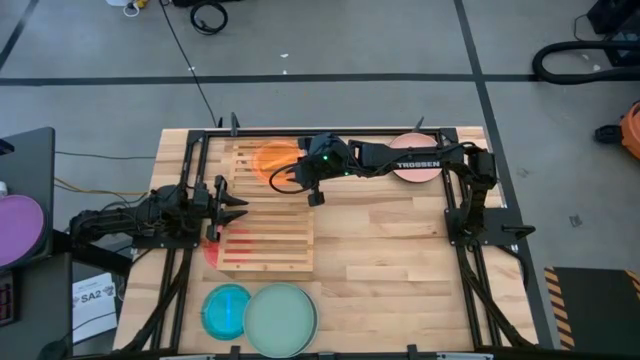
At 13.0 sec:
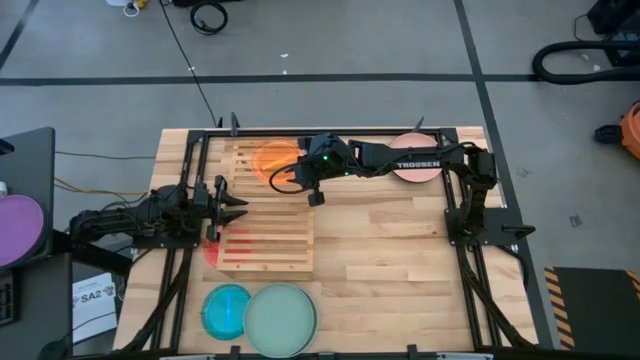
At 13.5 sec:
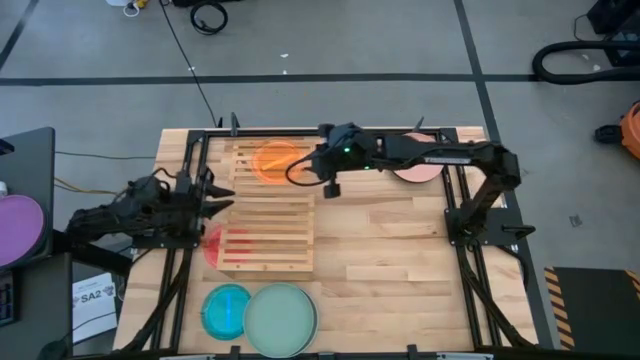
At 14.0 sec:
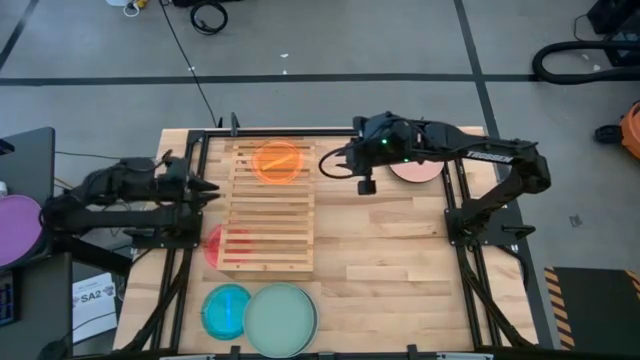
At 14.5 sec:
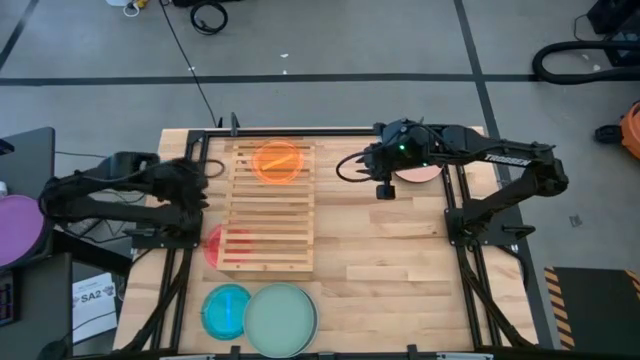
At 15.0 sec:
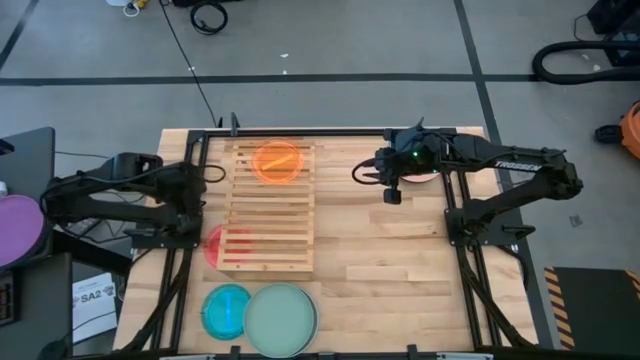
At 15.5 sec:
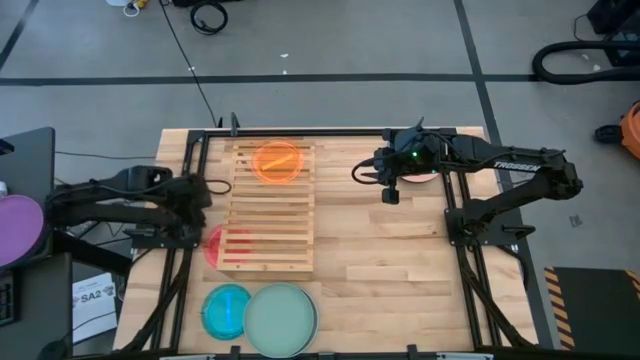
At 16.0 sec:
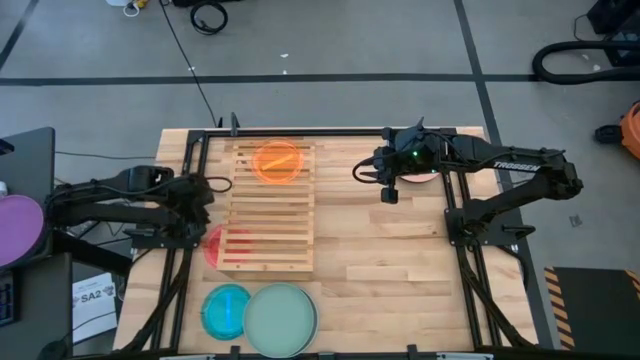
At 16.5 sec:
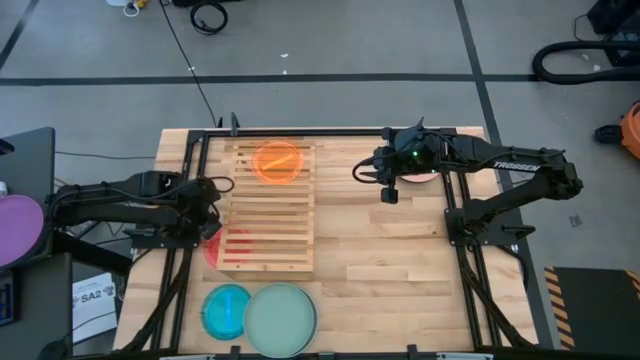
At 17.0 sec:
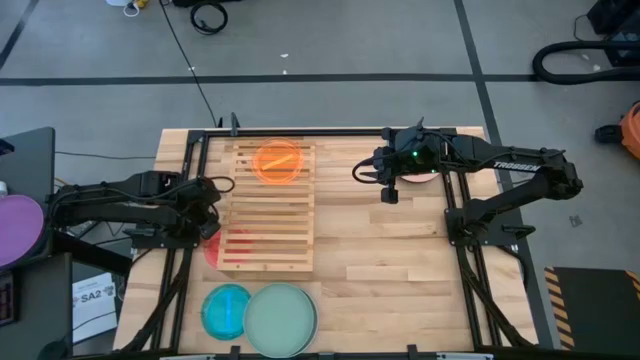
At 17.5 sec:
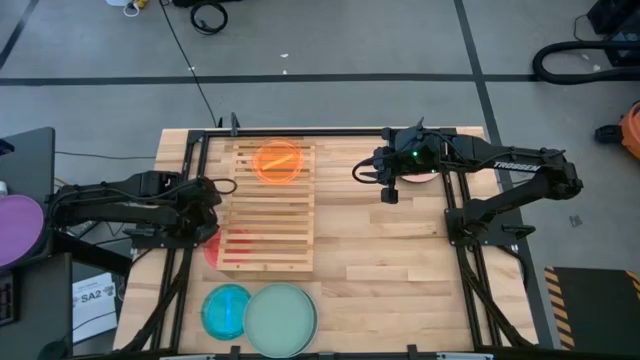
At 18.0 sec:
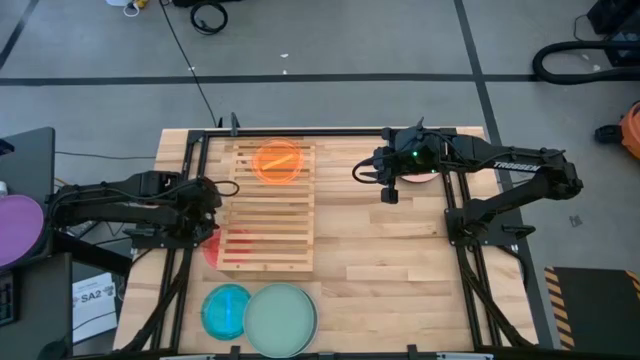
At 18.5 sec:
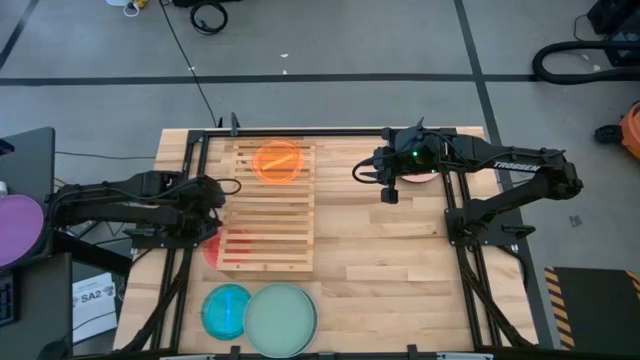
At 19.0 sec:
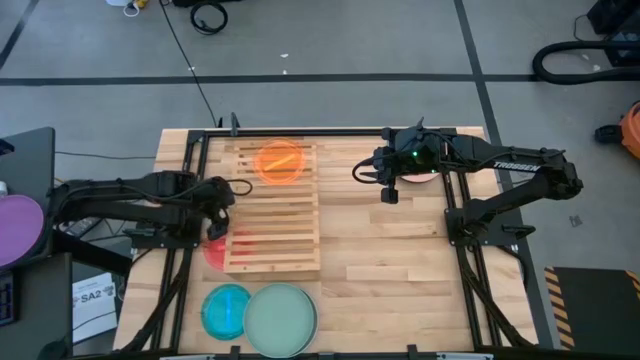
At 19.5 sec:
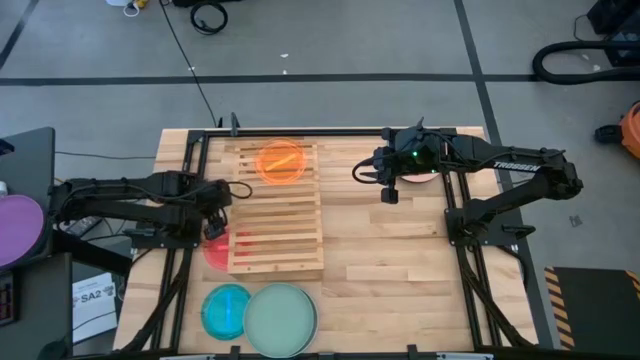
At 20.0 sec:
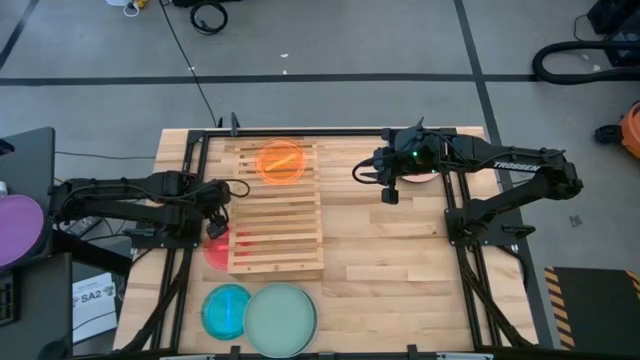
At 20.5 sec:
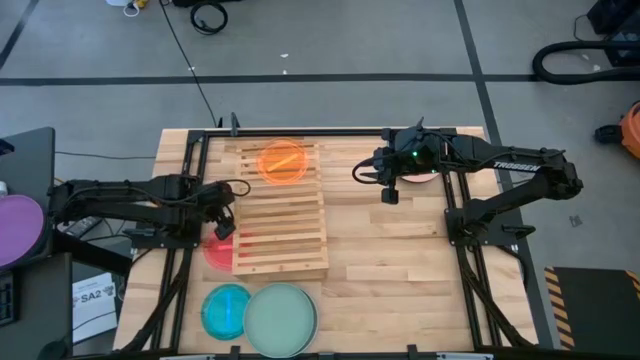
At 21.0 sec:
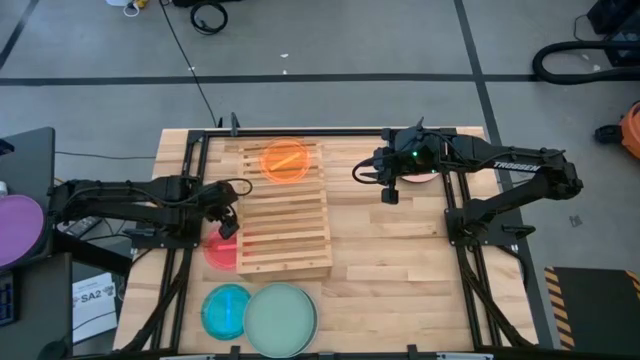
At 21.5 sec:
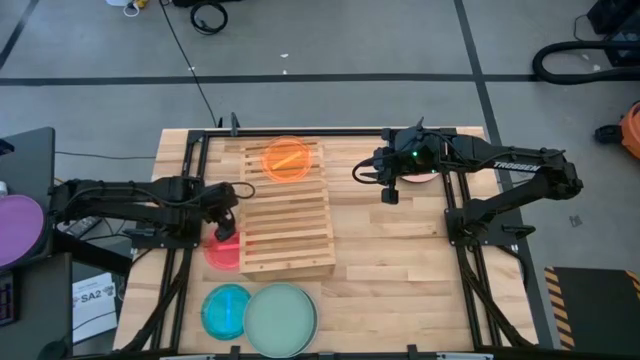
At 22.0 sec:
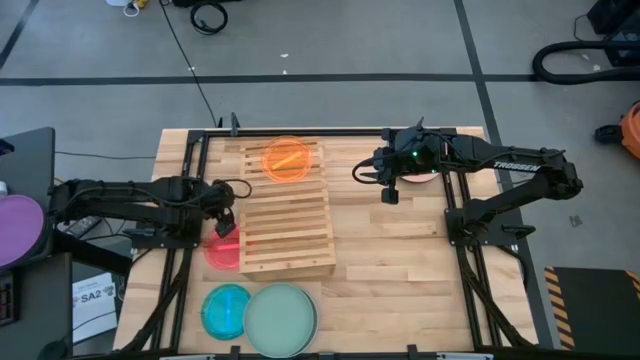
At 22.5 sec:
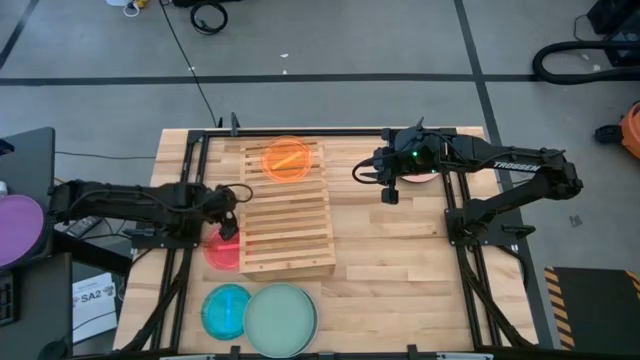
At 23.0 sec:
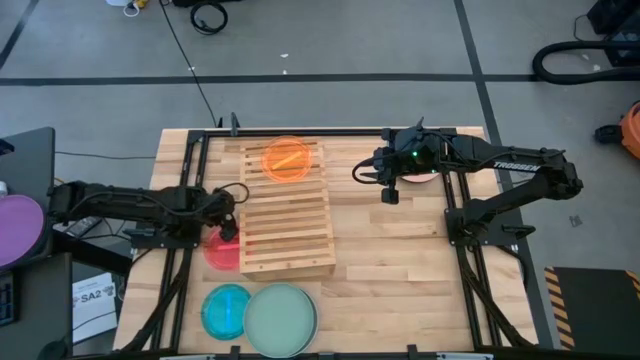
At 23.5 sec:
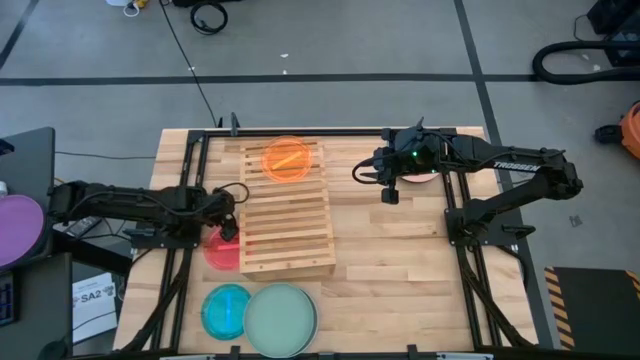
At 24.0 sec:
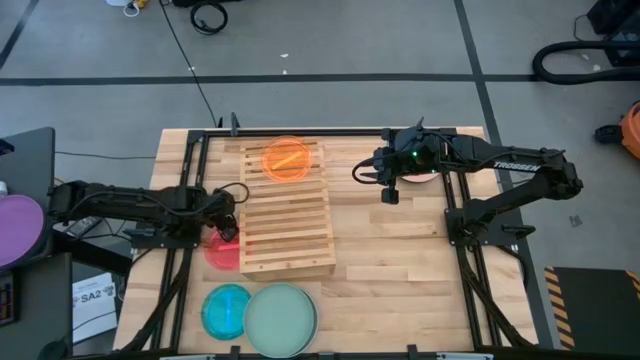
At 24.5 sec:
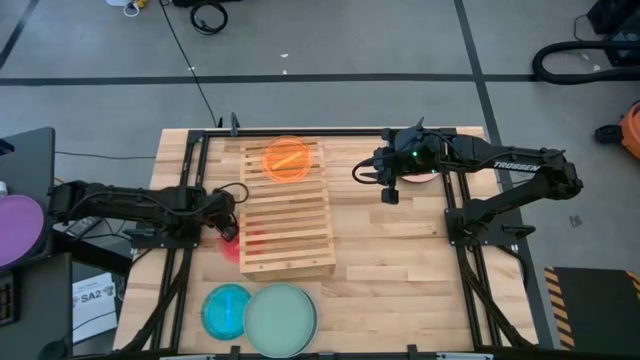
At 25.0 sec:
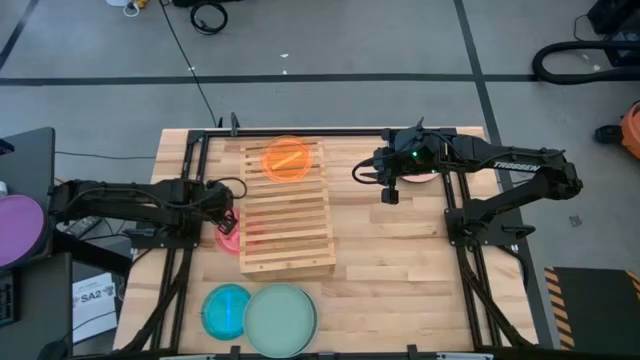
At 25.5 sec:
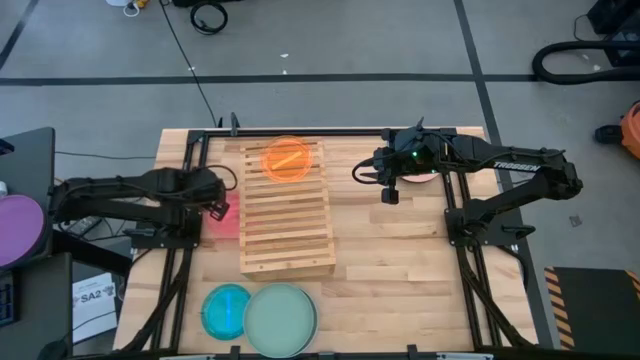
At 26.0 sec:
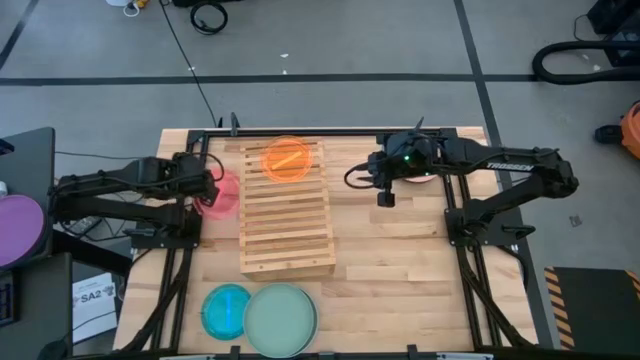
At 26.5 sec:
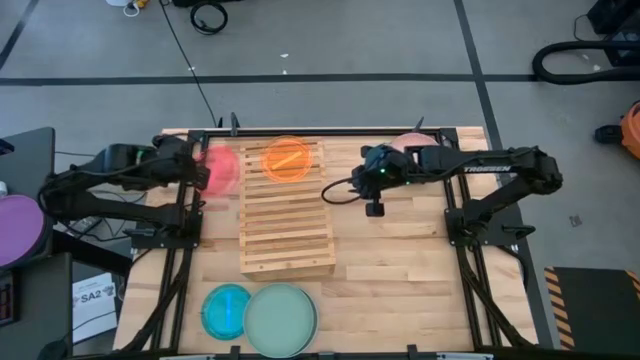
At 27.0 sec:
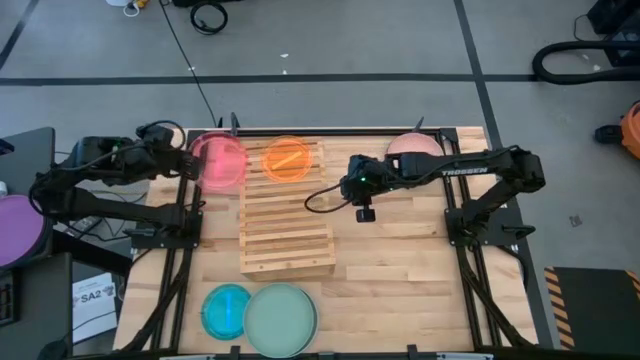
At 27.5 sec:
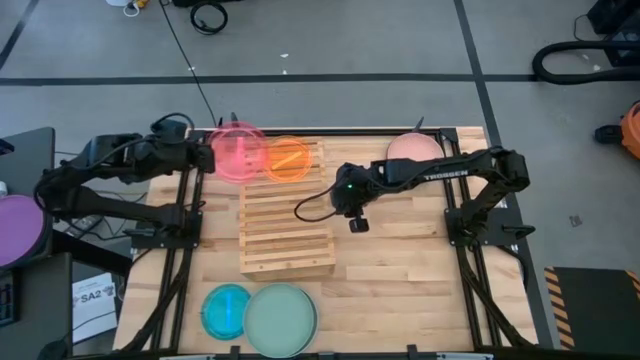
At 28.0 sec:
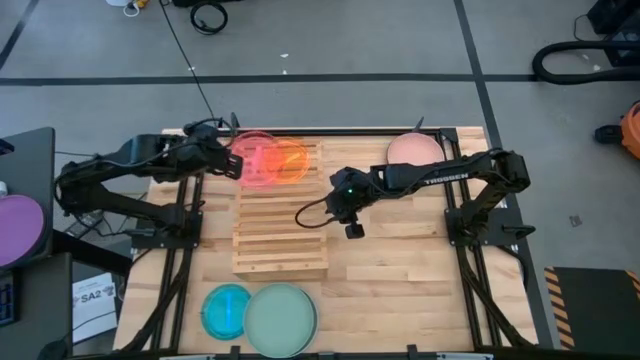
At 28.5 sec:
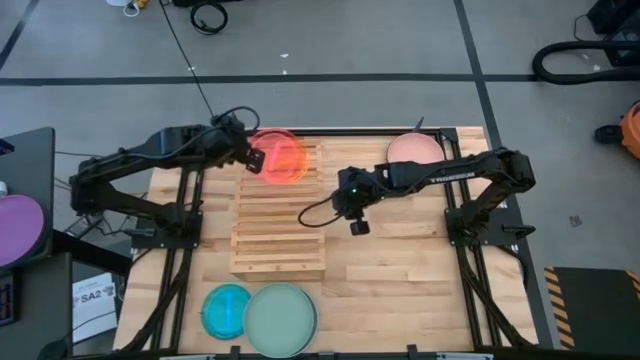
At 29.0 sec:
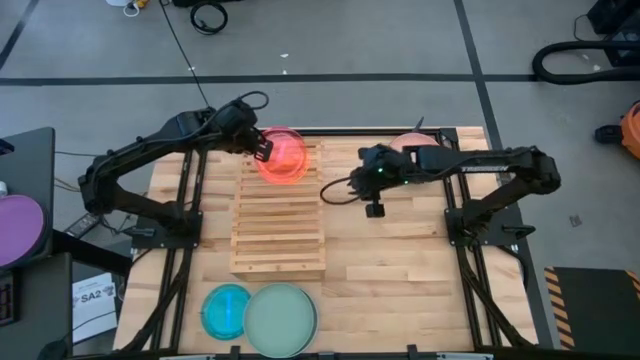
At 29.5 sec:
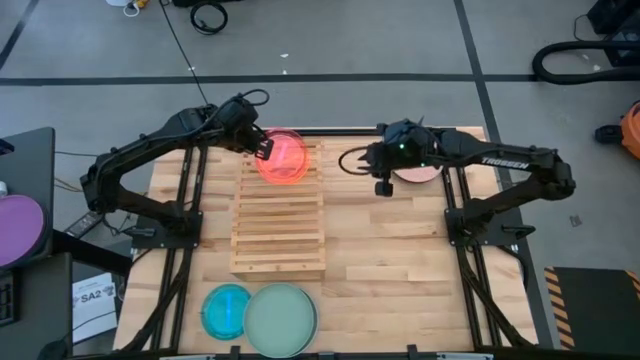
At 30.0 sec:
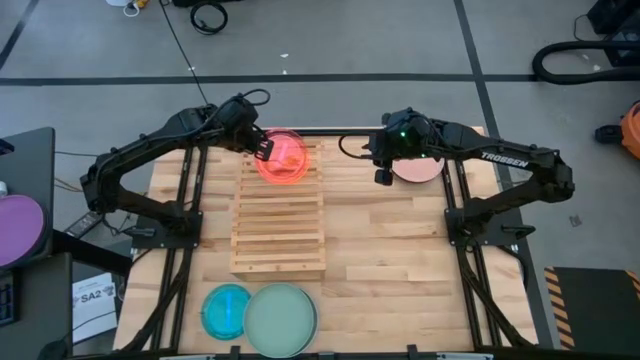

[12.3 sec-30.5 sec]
Task: Place and stack plates onto a shelf
Stack the pink transparent plate on the orange transparent plate
